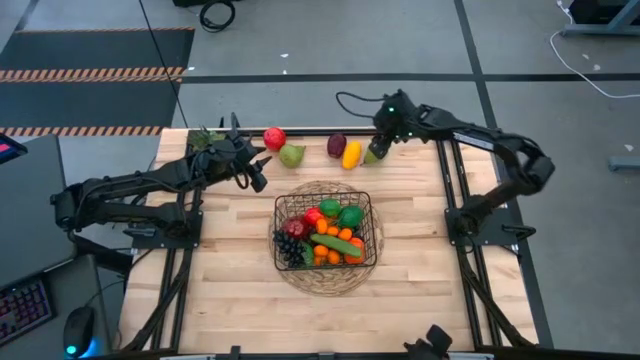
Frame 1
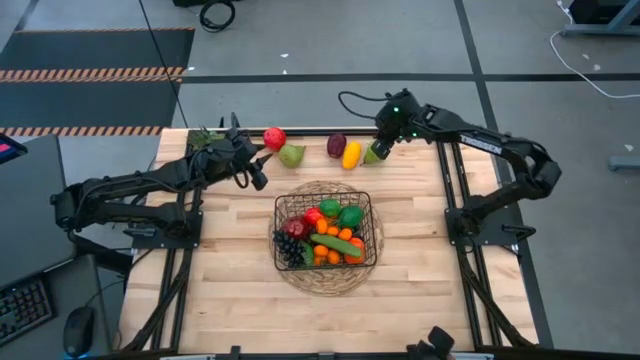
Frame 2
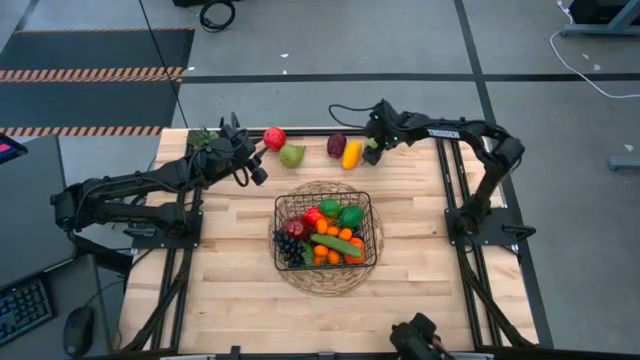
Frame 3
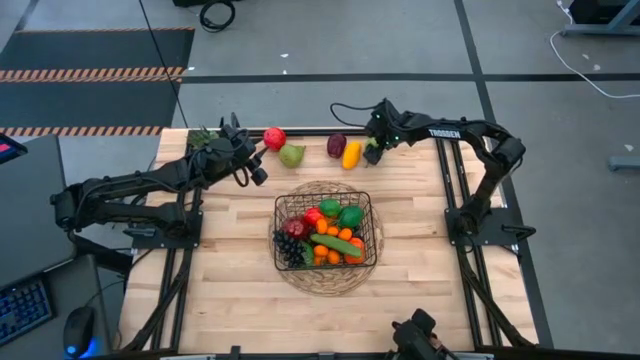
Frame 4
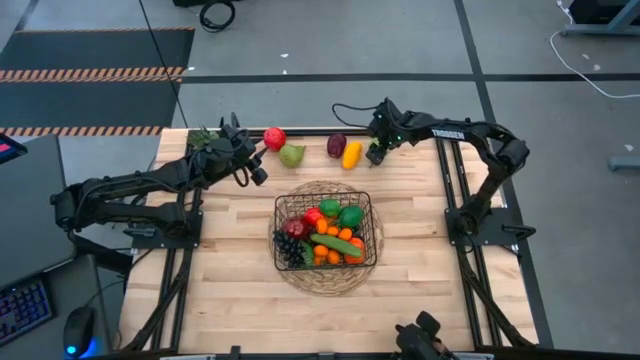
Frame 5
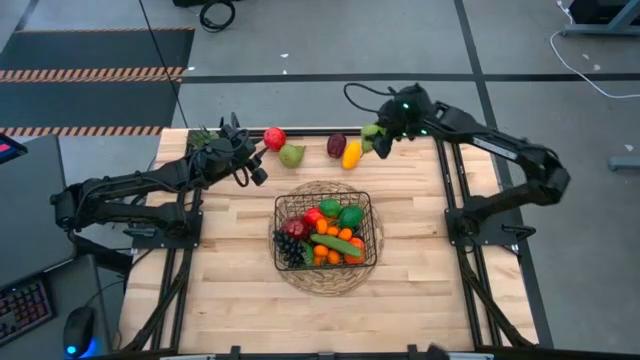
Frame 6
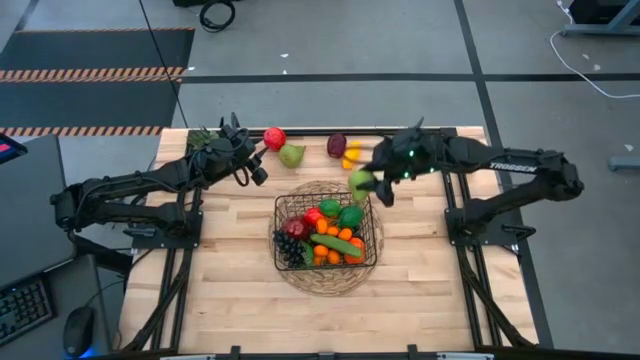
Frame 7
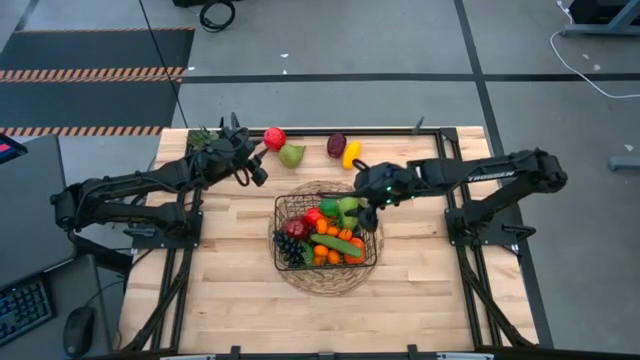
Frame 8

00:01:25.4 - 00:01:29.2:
Task: Build produce basket
Put the right green pear into the black wire basket

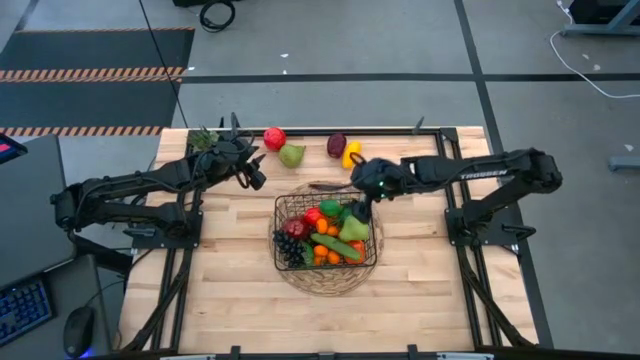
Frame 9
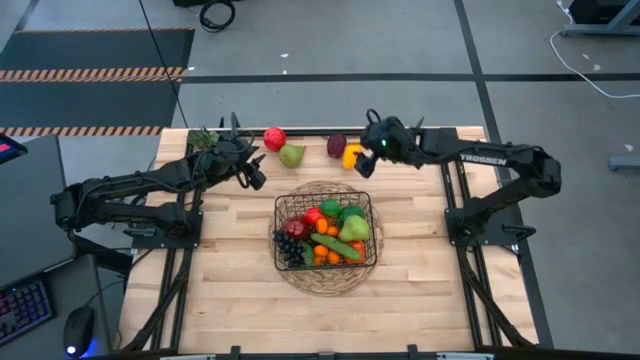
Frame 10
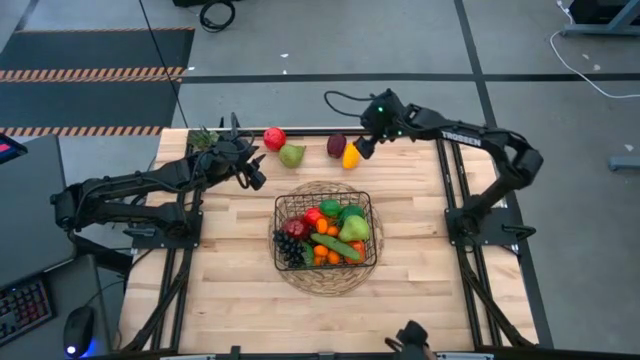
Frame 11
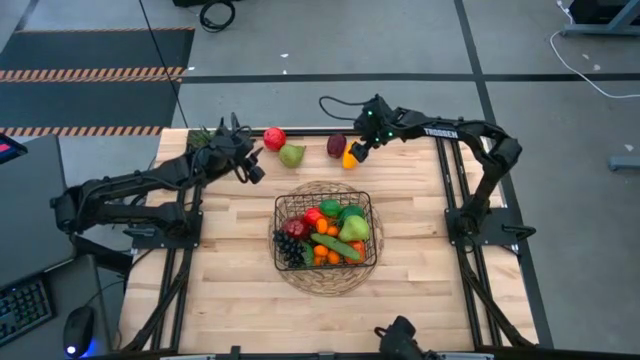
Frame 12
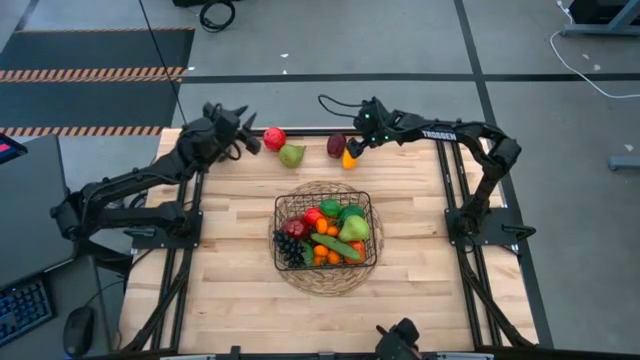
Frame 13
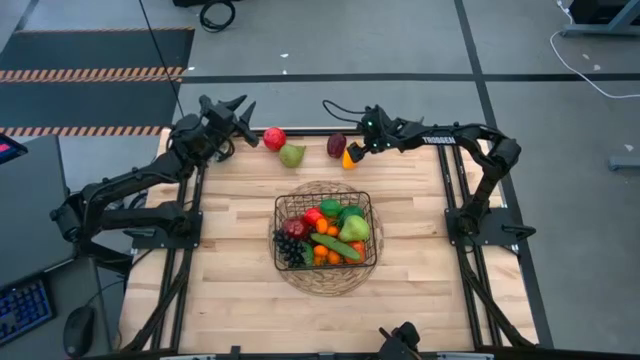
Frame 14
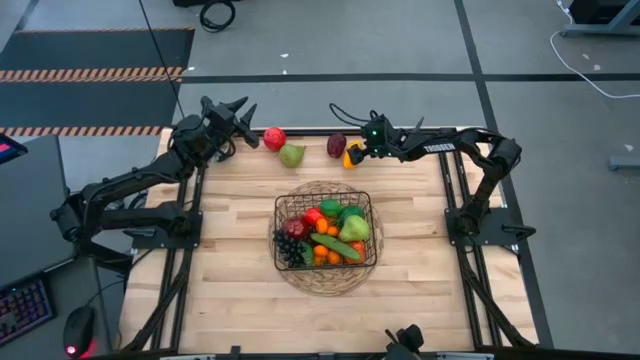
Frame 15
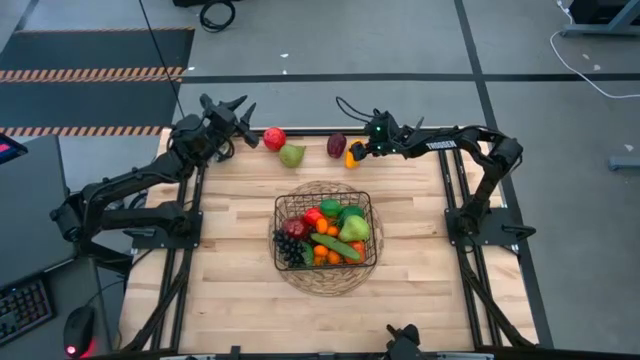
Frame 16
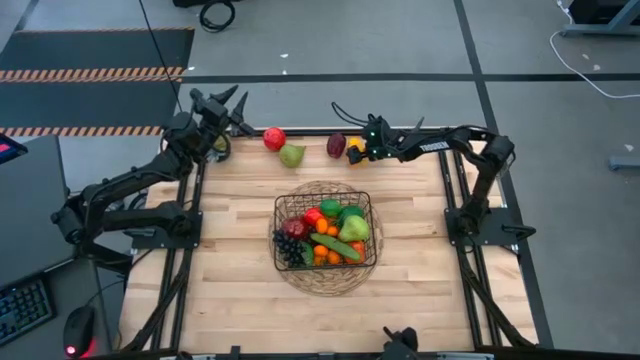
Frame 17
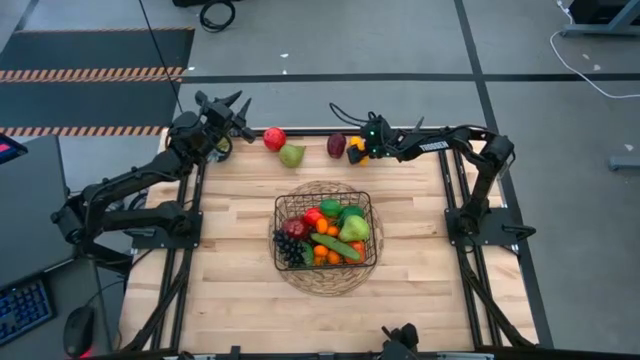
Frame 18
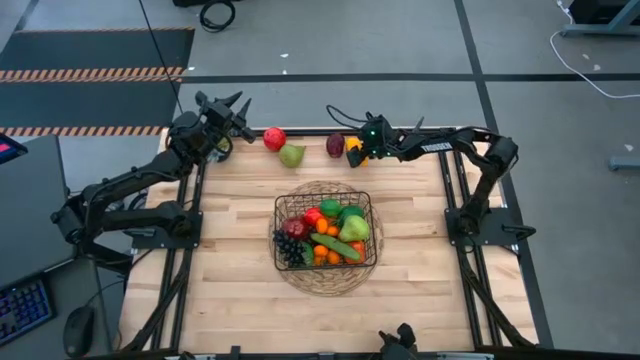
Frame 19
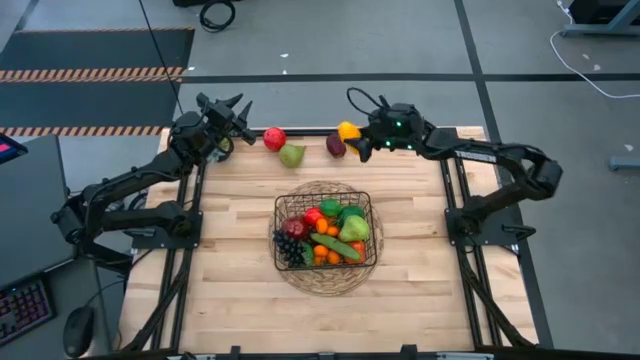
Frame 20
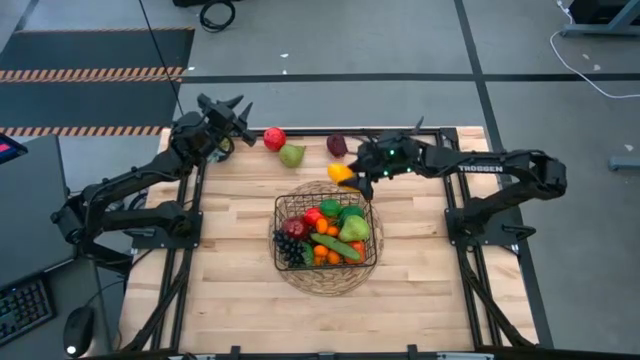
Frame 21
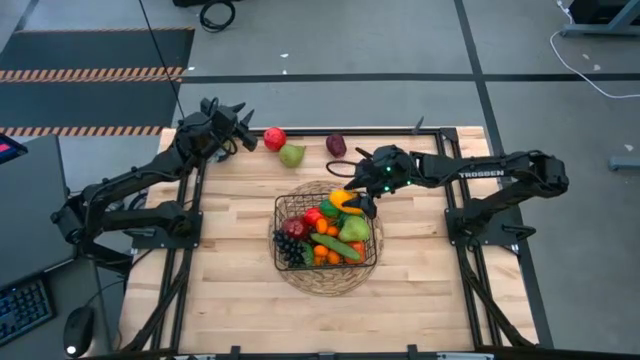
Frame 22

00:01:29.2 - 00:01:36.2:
Put the yellow mango into the black wire basket

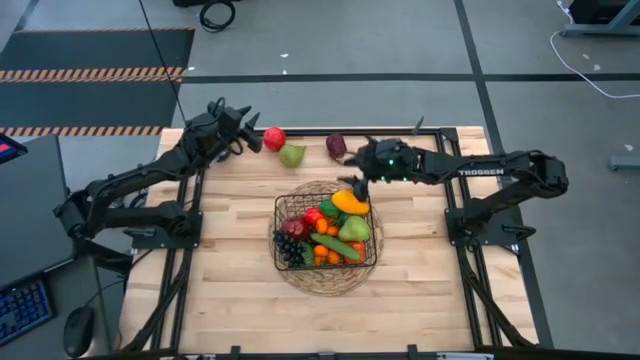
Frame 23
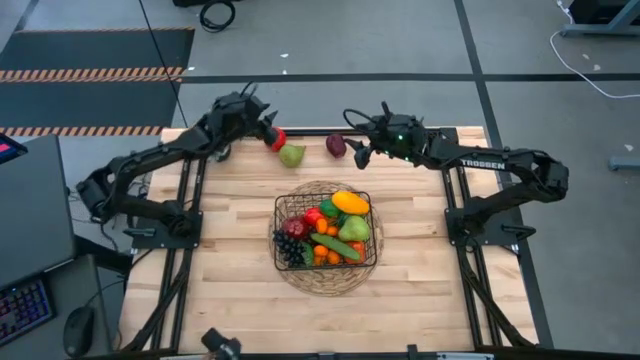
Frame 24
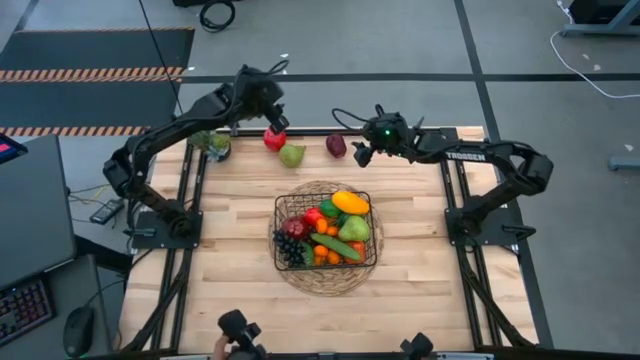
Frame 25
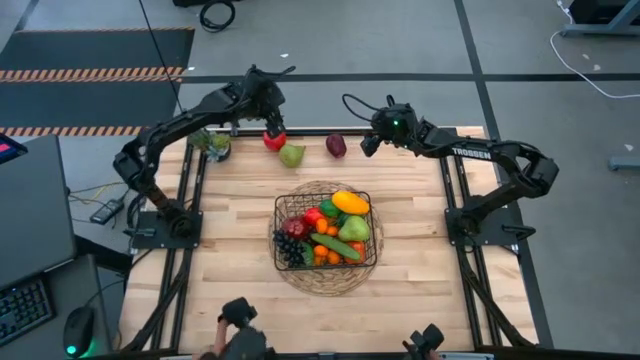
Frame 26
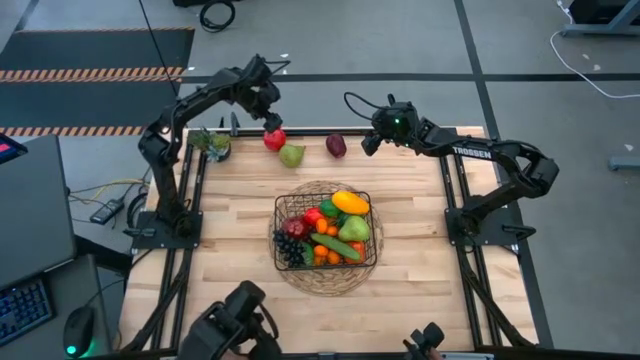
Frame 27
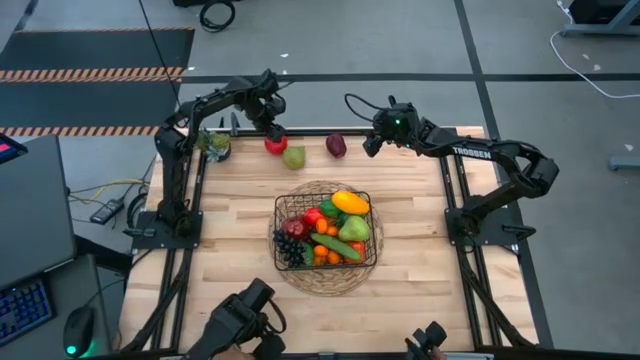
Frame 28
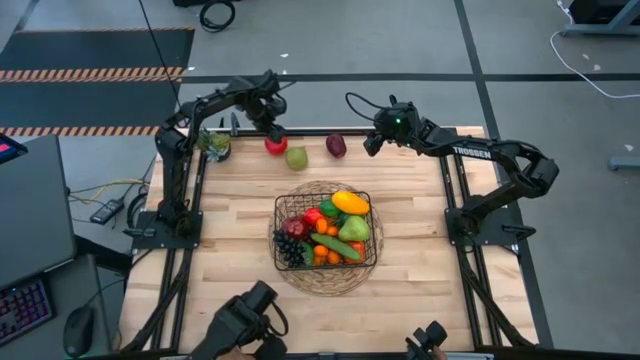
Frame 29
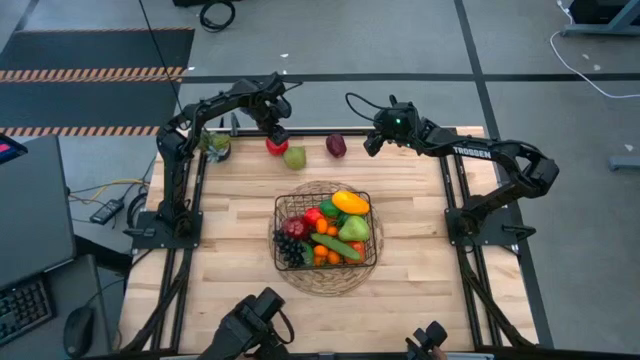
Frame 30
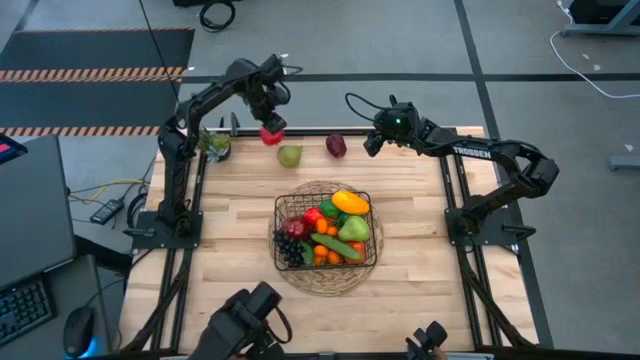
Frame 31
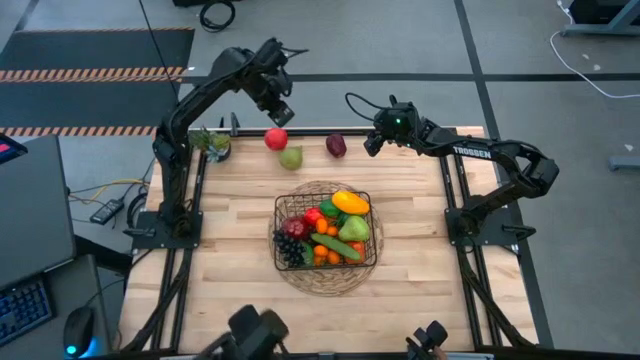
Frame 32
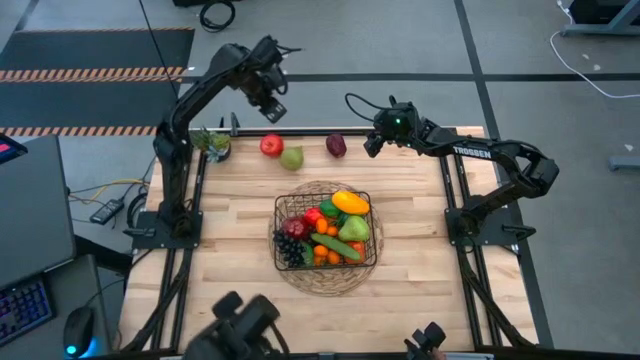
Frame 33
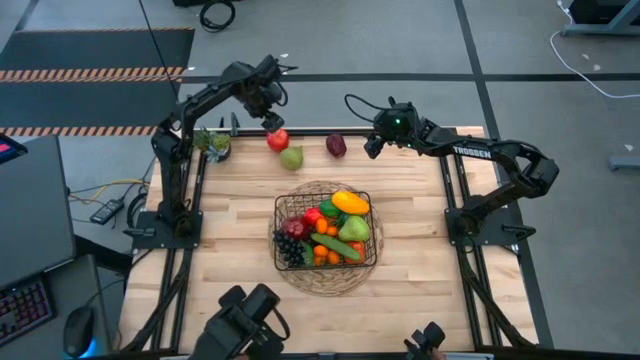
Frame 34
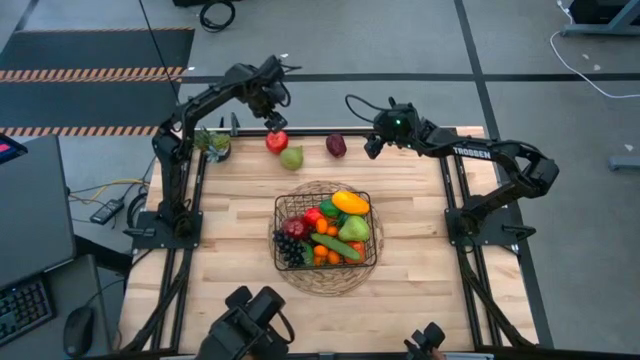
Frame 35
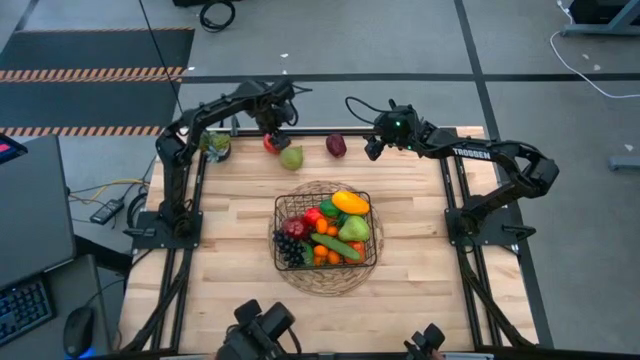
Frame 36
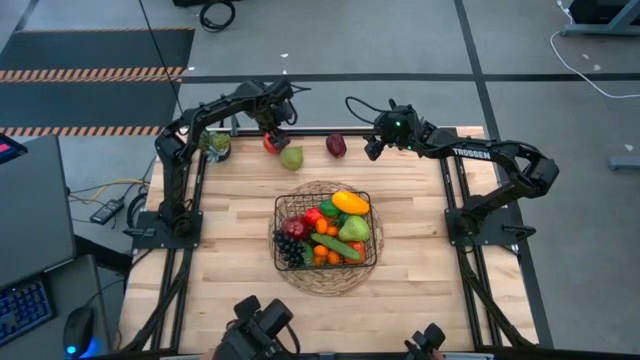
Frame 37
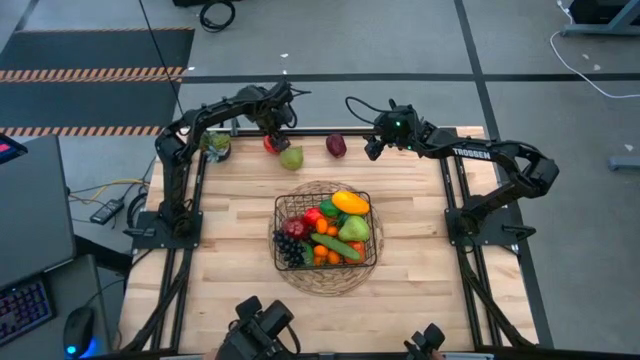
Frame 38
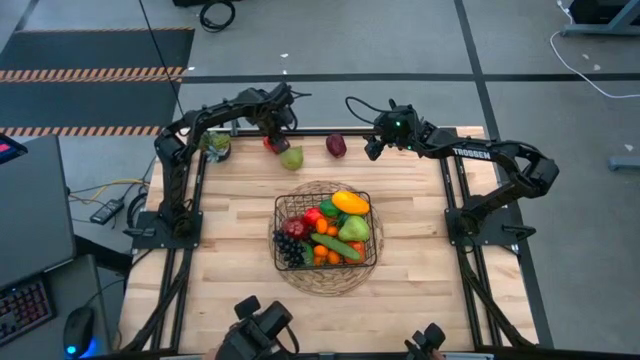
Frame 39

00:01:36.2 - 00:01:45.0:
Put the red apple into the black wire basket

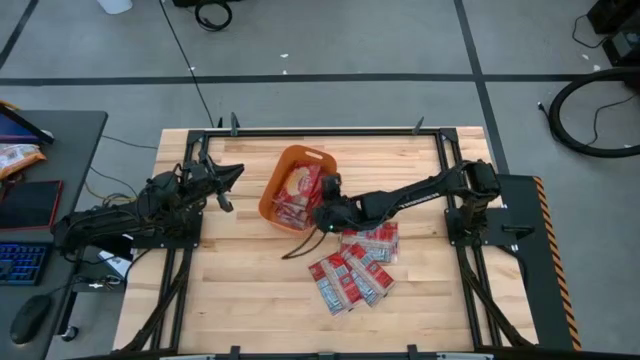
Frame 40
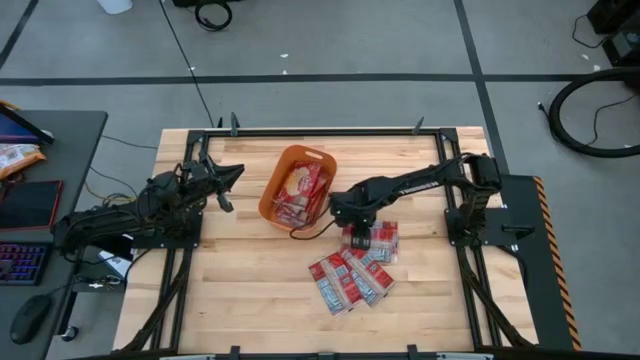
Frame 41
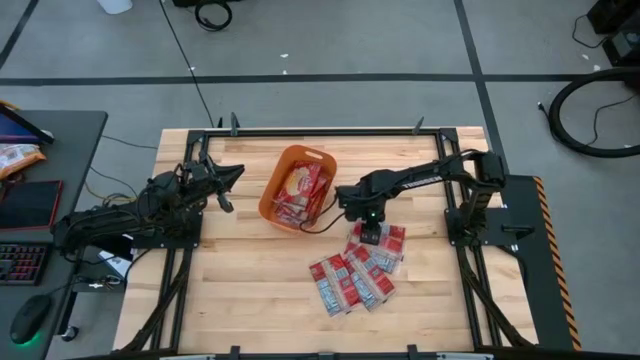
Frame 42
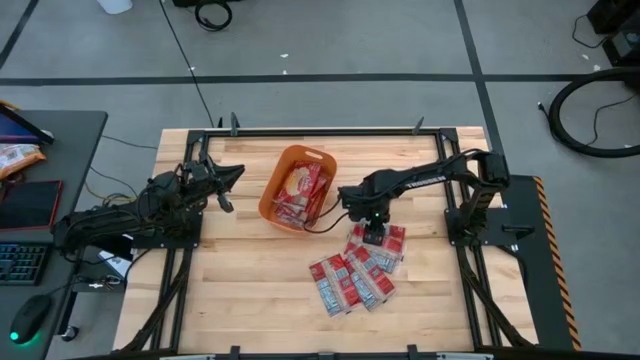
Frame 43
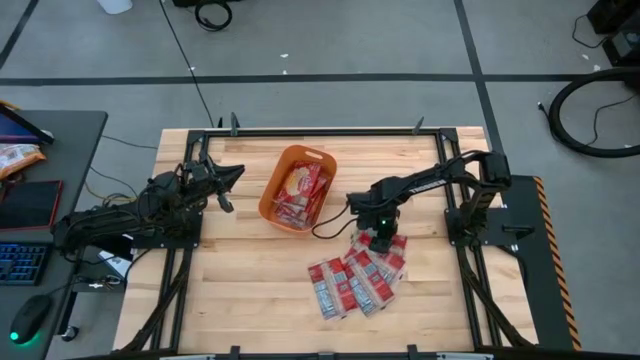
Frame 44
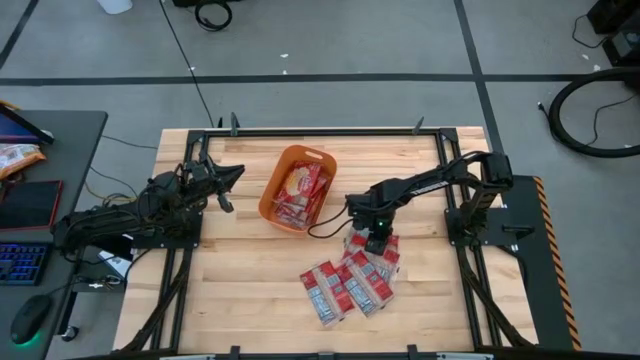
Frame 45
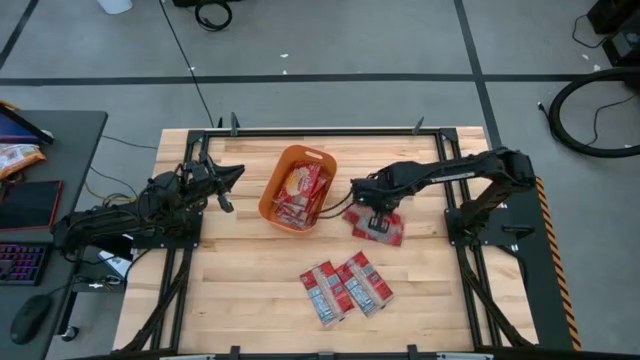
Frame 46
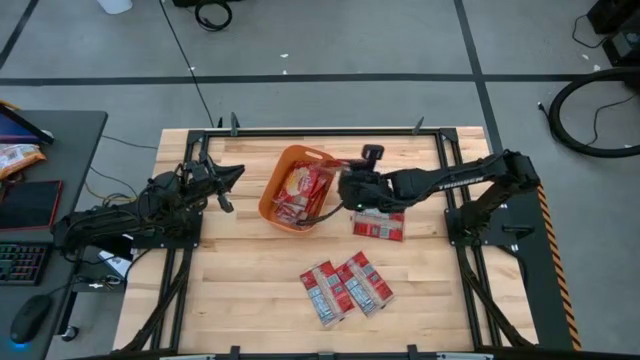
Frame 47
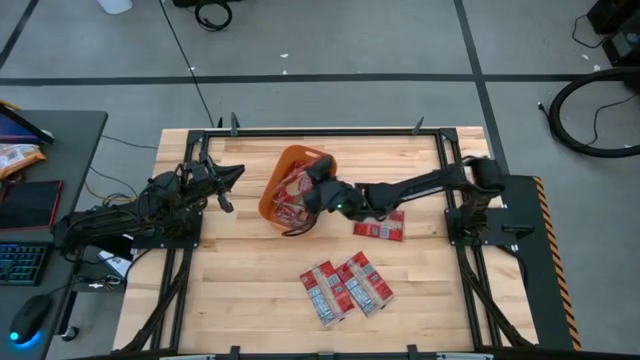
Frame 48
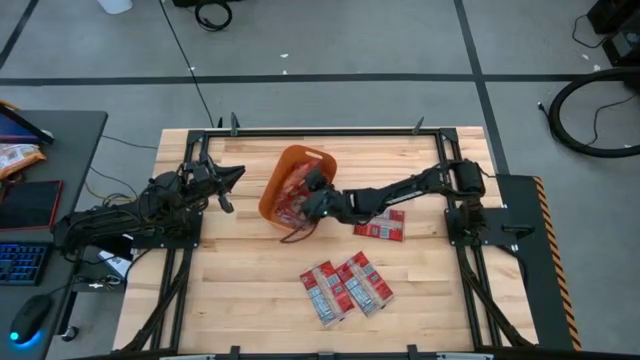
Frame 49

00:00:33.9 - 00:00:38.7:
Task: Sort popcorn bags into baskets
Put the red popcorn pack into the orange bin
